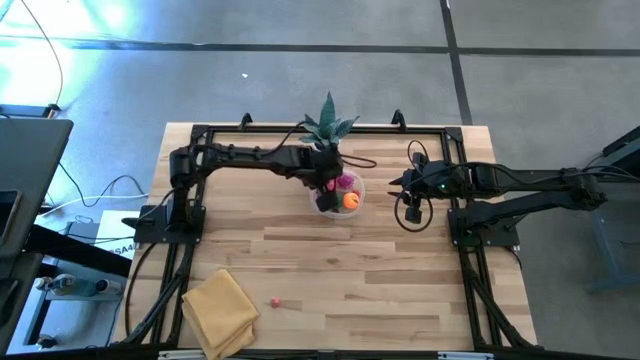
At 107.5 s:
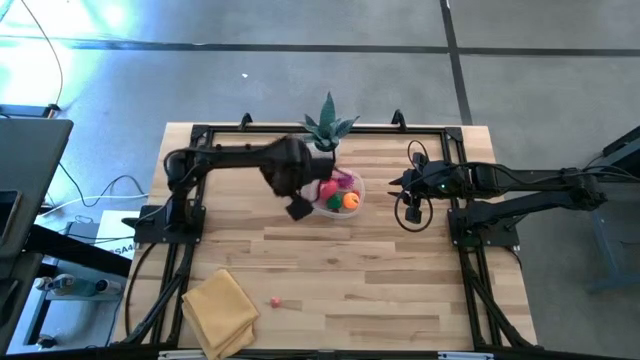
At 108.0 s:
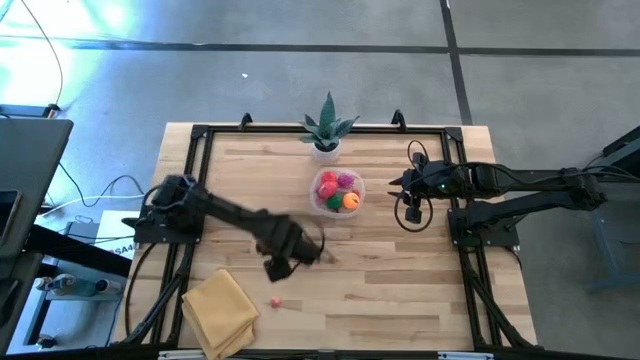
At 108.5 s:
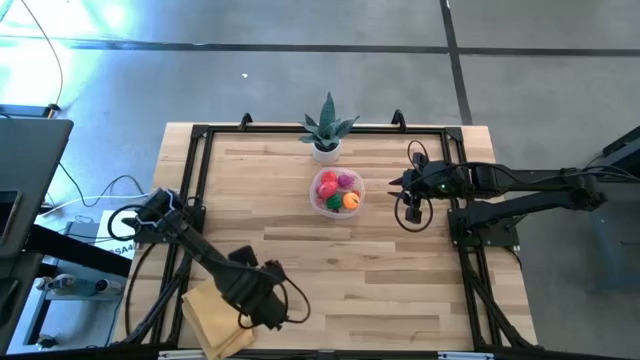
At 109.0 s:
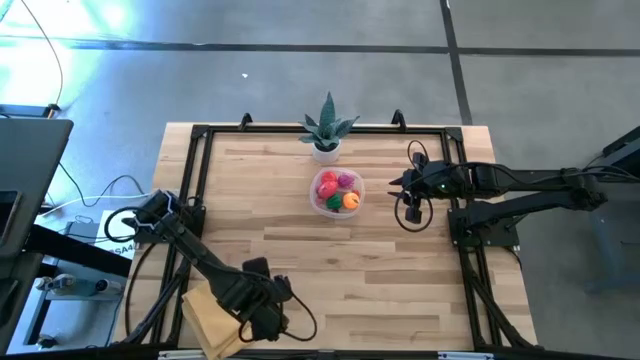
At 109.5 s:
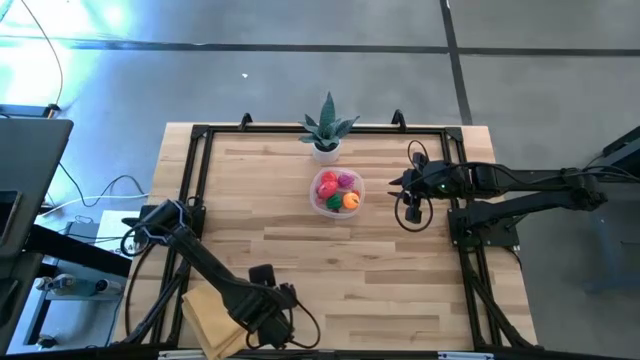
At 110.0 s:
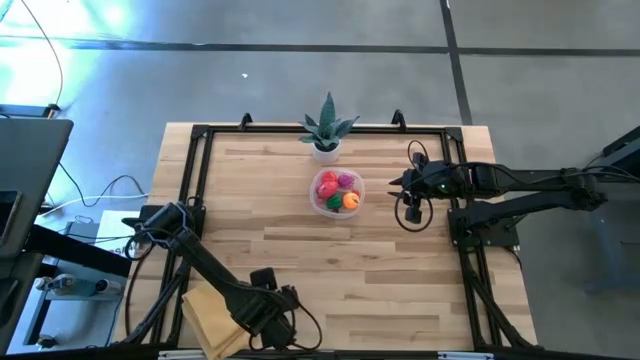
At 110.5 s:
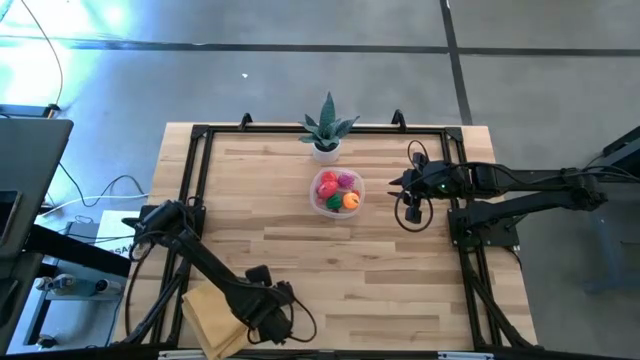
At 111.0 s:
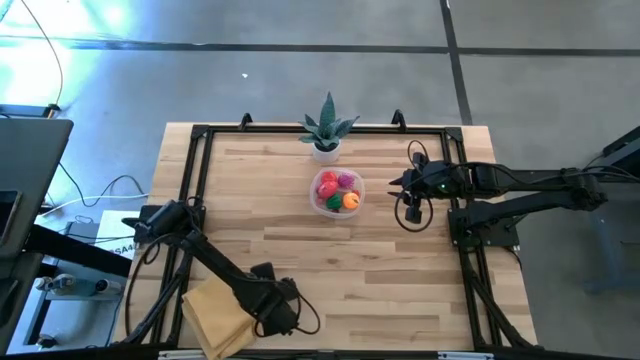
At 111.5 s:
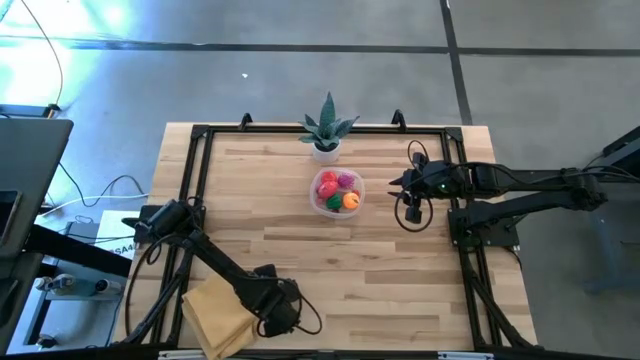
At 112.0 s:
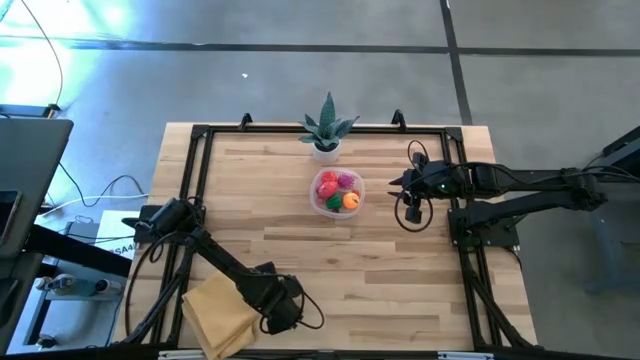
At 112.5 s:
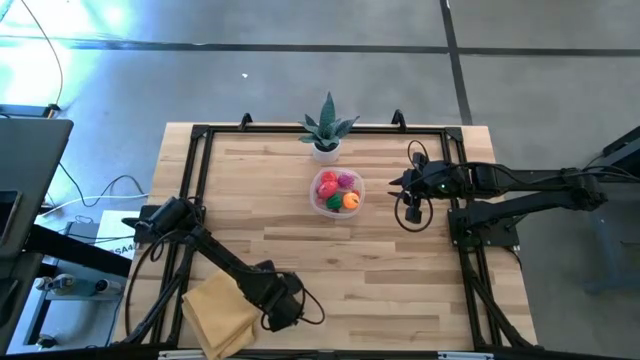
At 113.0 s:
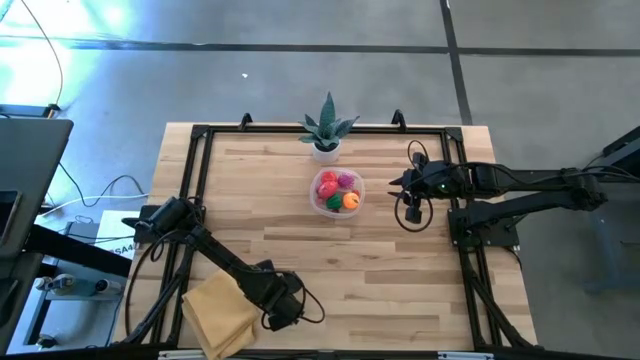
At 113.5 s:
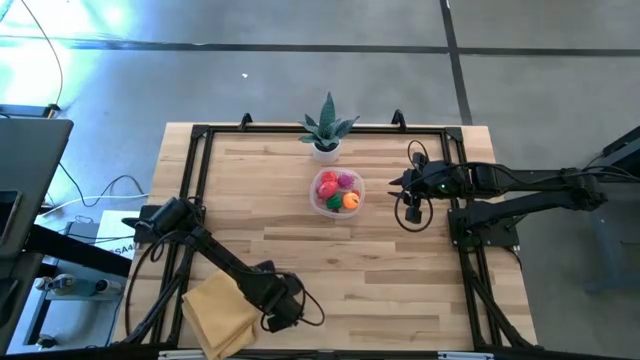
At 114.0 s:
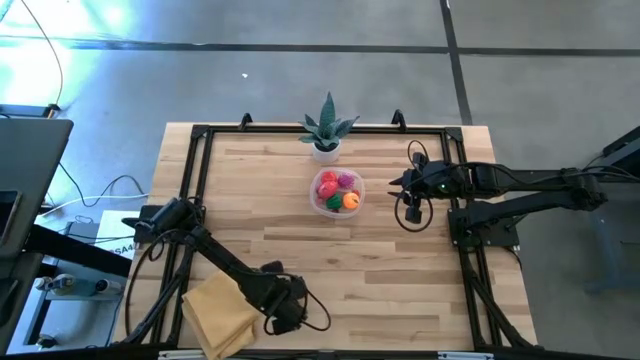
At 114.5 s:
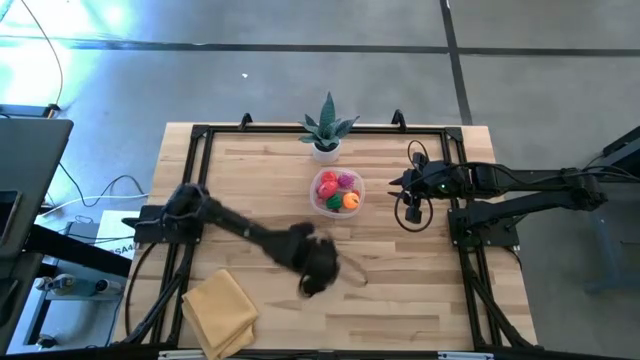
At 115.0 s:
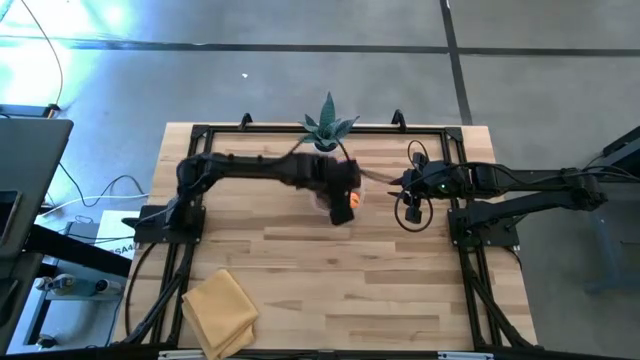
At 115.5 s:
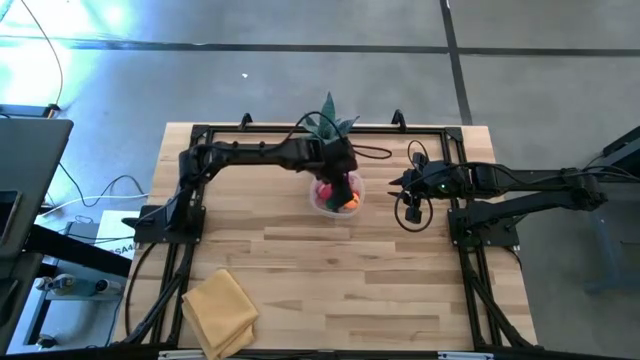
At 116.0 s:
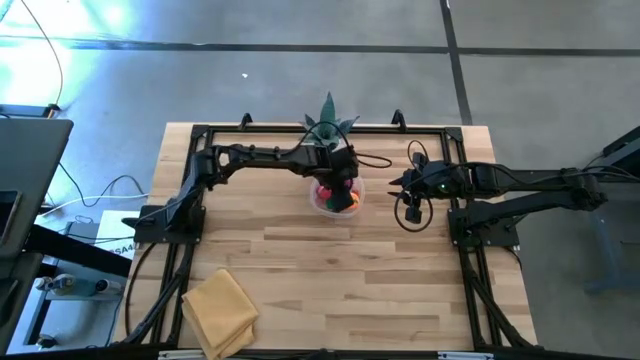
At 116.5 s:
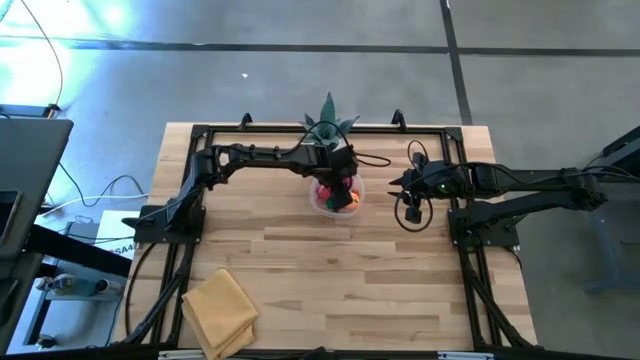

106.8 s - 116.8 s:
Task: Pick and placing Produce into tupperware
Put the pink peach into the transparent container

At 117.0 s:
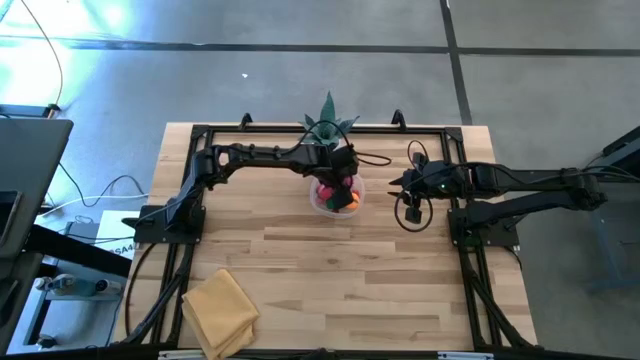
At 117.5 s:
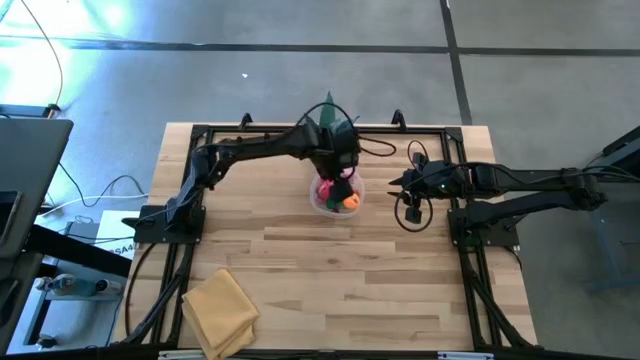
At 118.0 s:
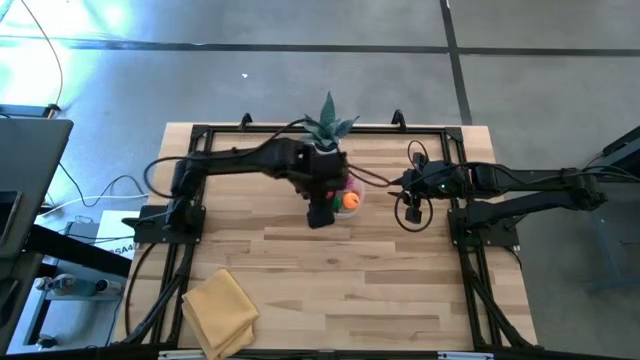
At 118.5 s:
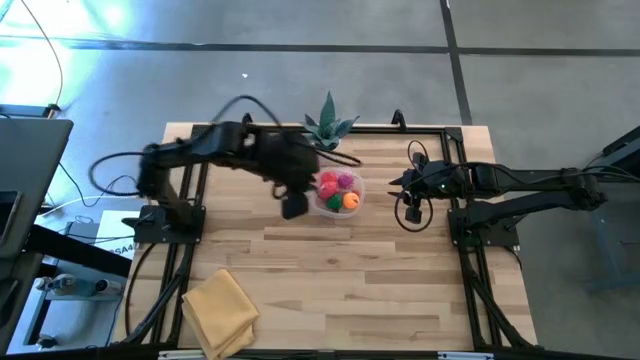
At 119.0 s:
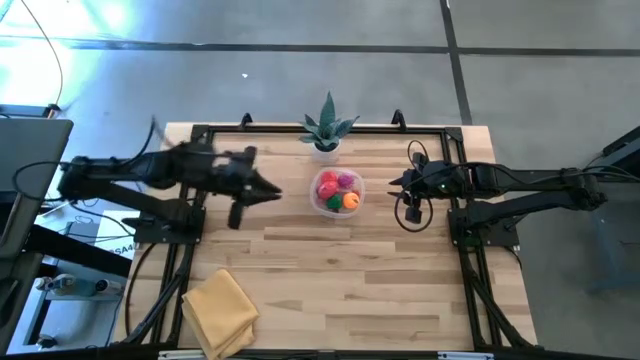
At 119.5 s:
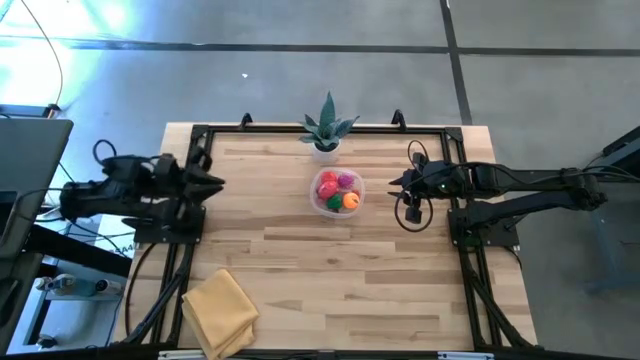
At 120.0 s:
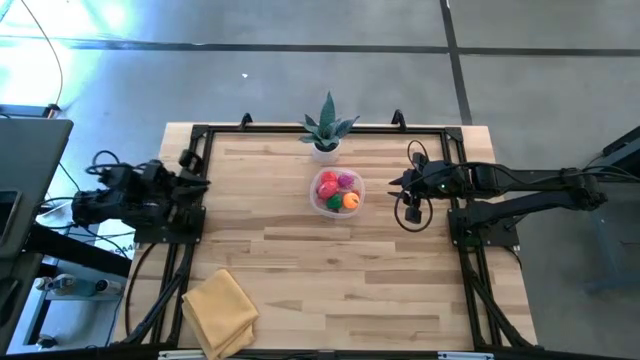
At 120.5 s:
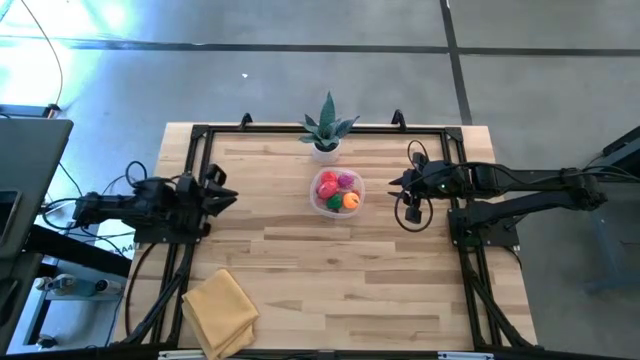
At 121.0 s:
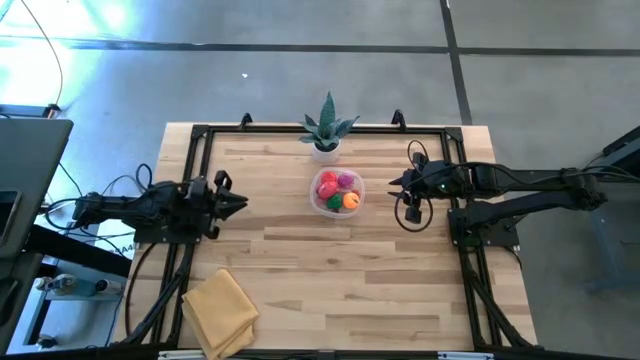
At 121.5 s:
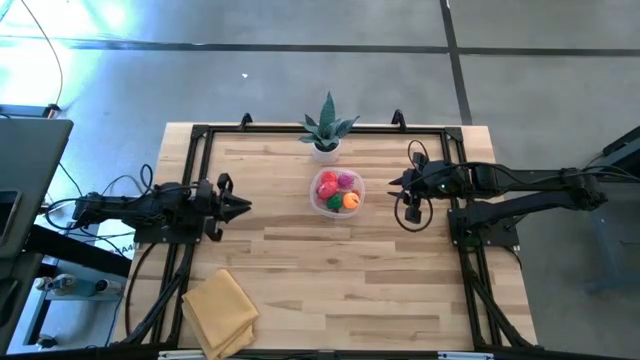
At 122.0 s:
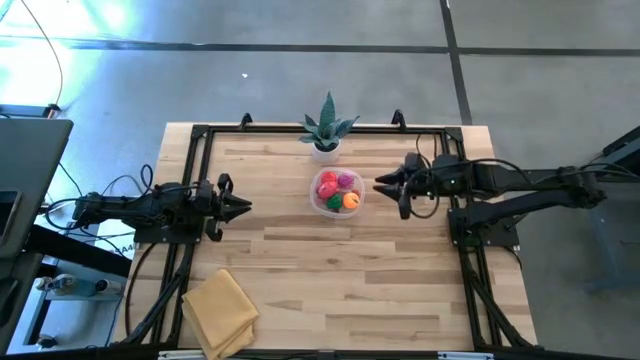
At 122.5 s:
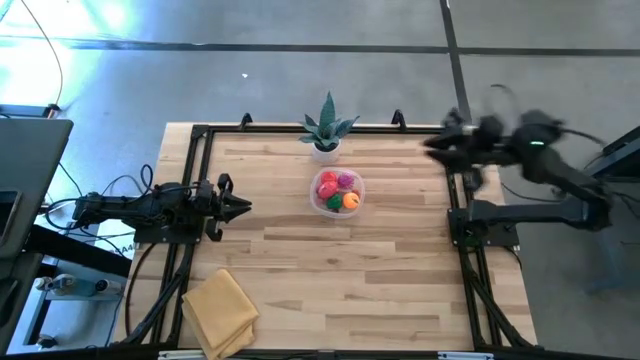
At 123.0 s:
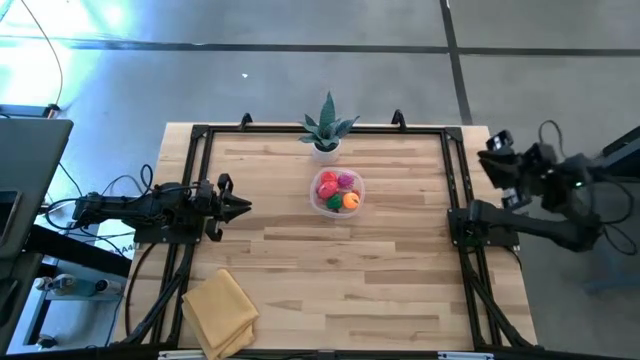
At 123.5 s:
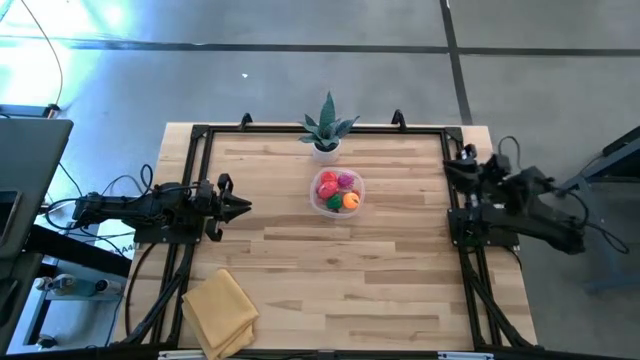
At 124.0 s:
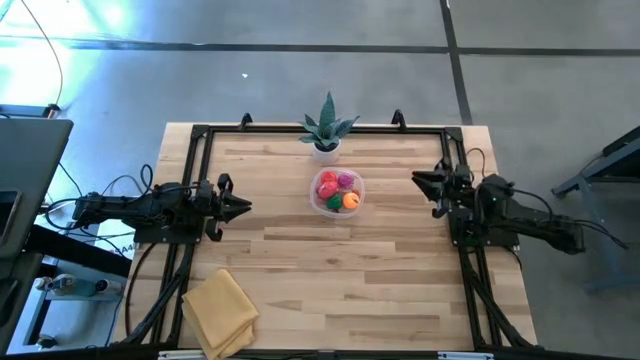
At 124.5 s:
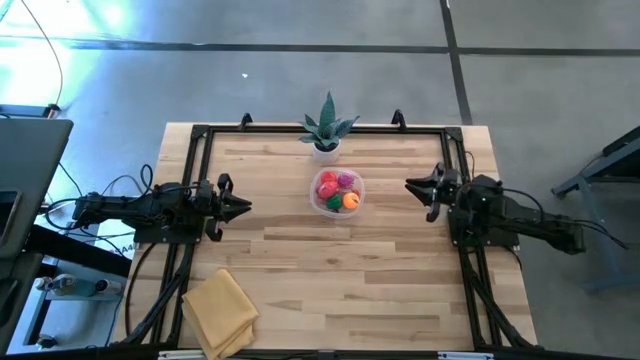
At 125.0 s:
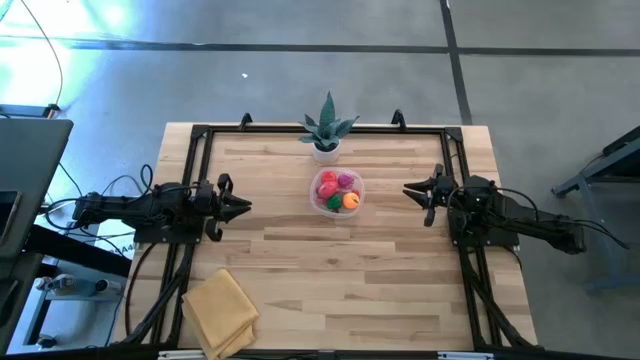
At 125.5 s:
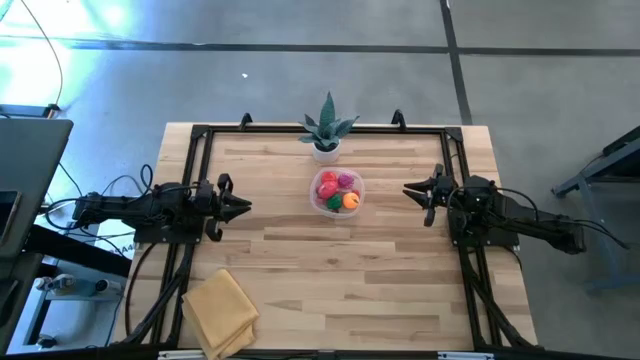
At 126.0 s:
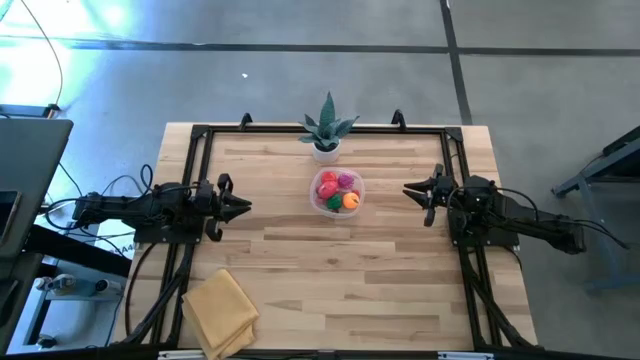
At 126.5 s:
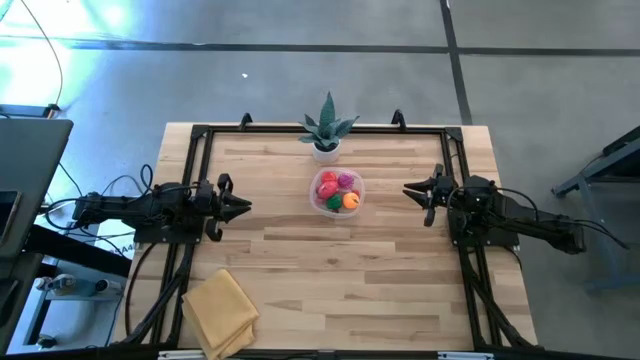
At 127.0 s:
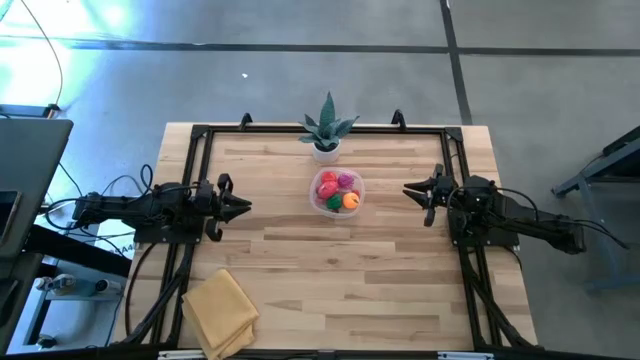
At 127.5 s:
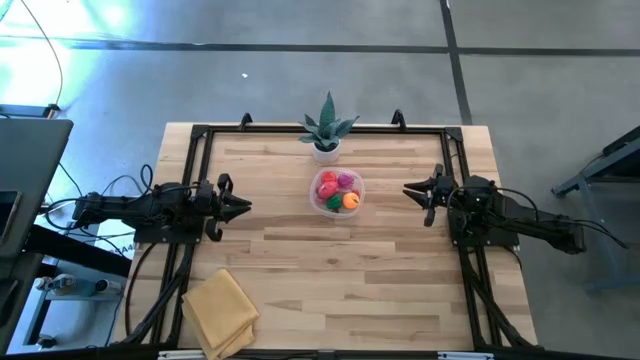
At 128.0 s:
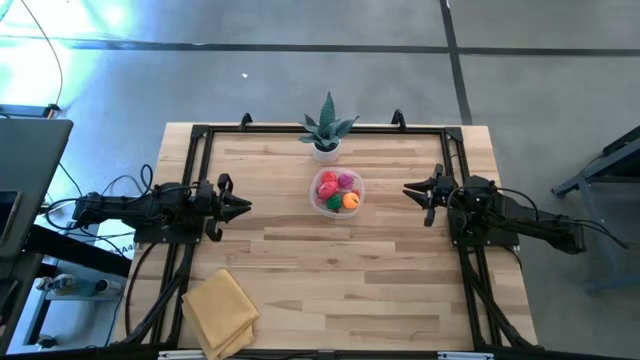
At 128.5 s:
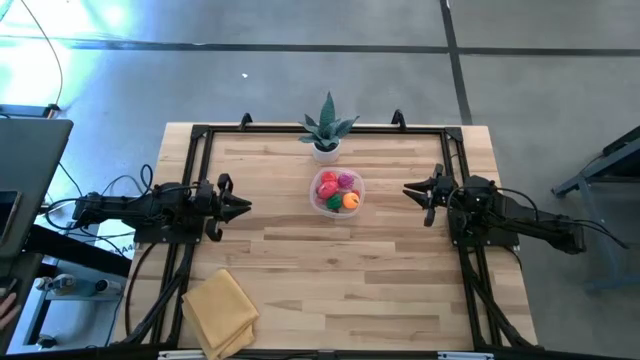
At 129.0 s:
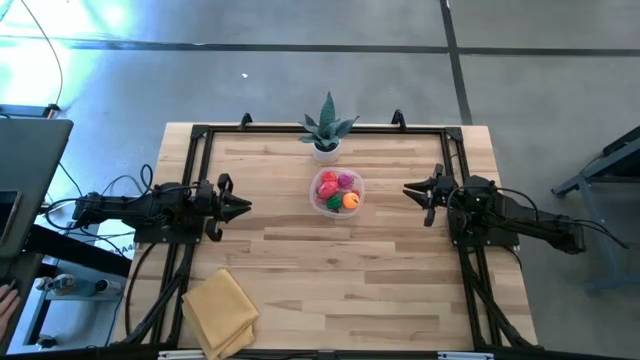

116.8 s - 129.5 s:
Return to Home Position
